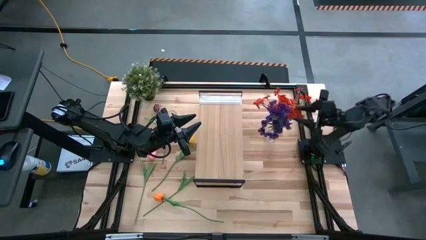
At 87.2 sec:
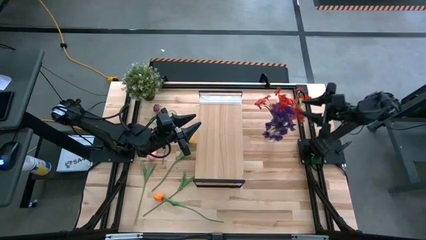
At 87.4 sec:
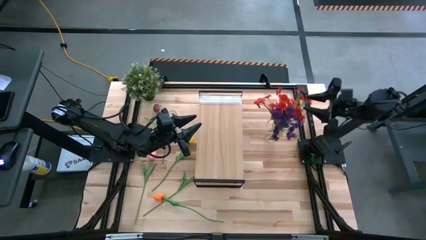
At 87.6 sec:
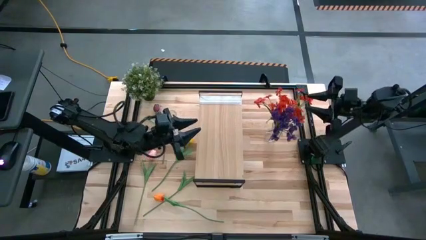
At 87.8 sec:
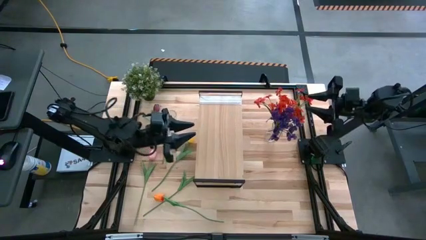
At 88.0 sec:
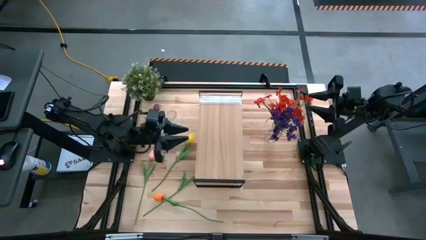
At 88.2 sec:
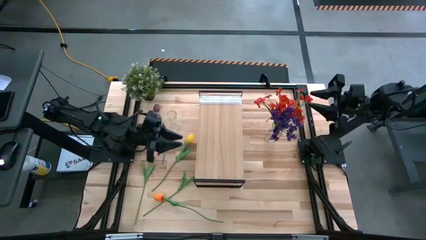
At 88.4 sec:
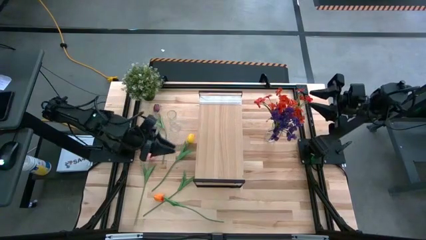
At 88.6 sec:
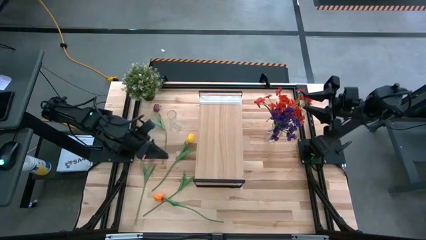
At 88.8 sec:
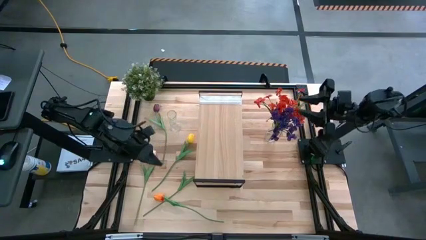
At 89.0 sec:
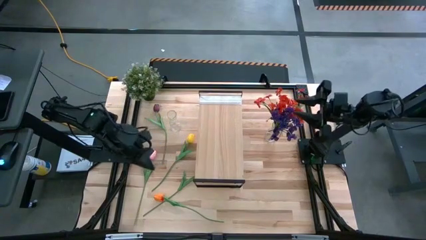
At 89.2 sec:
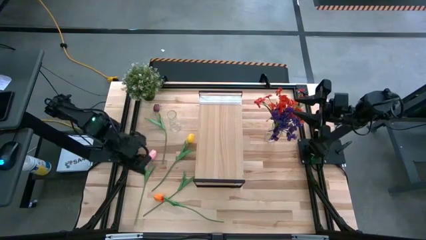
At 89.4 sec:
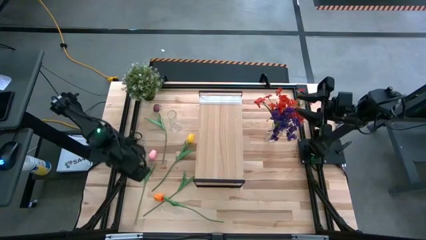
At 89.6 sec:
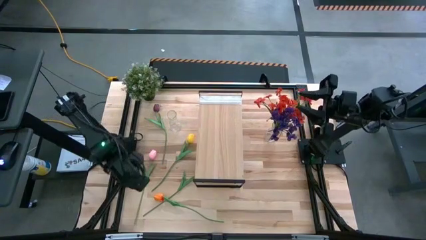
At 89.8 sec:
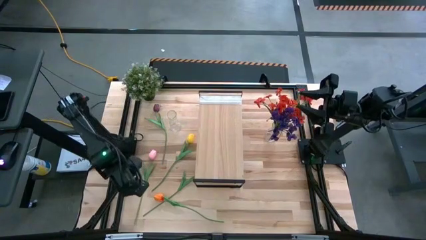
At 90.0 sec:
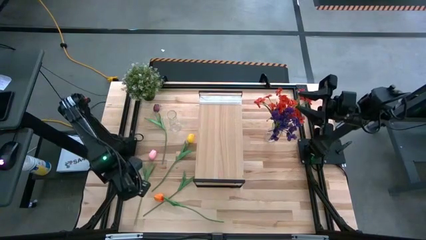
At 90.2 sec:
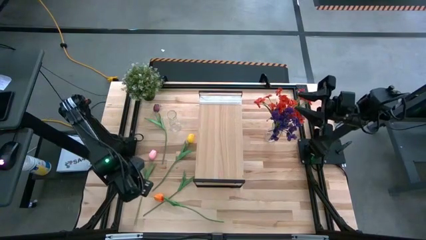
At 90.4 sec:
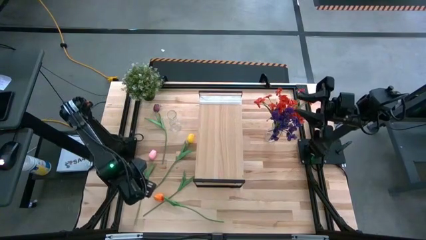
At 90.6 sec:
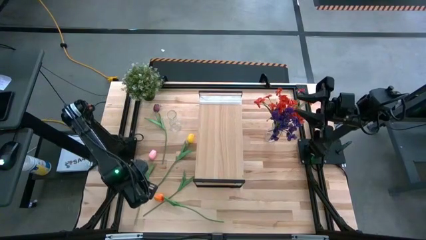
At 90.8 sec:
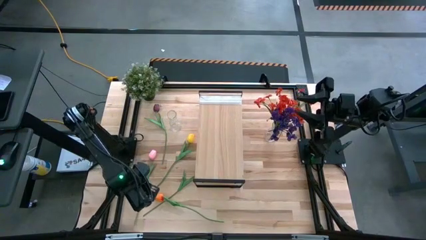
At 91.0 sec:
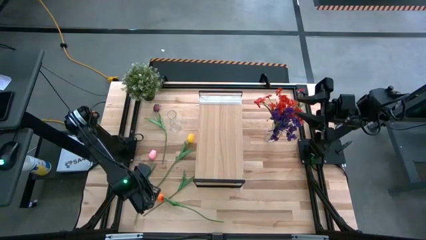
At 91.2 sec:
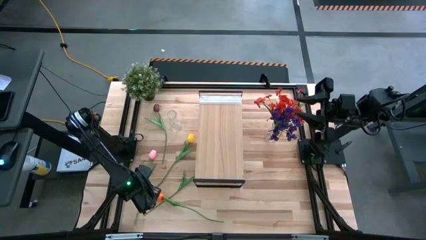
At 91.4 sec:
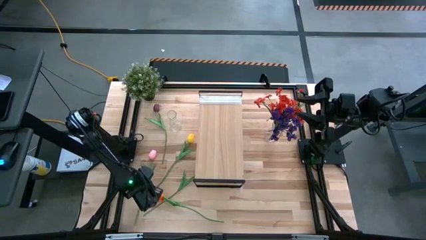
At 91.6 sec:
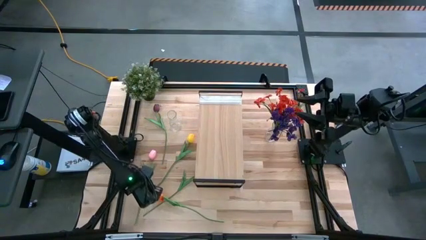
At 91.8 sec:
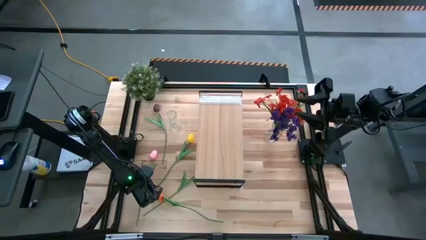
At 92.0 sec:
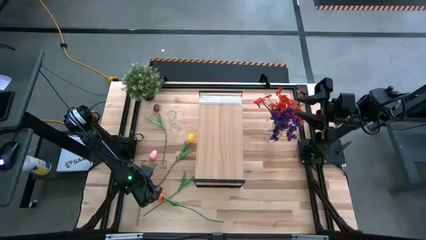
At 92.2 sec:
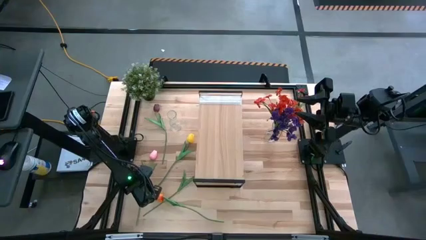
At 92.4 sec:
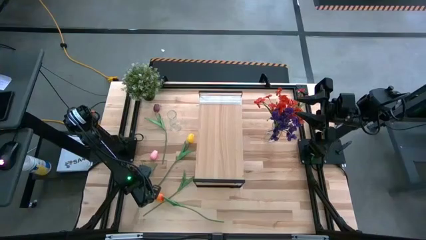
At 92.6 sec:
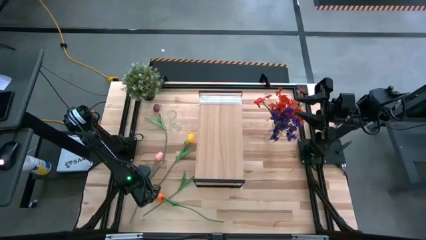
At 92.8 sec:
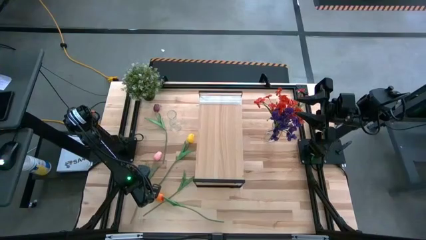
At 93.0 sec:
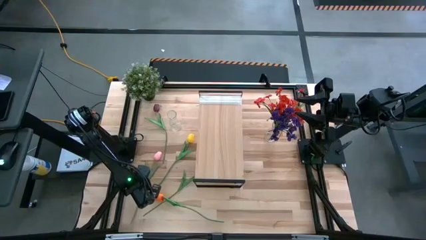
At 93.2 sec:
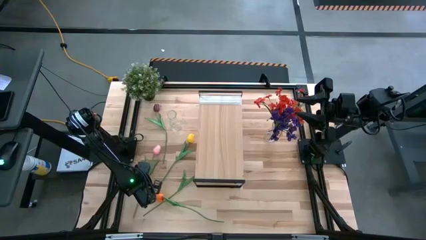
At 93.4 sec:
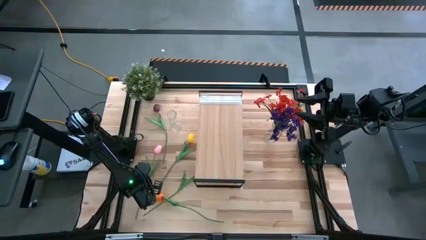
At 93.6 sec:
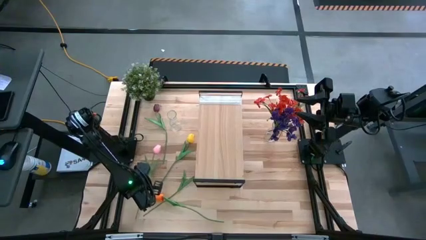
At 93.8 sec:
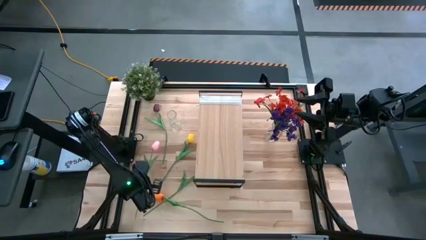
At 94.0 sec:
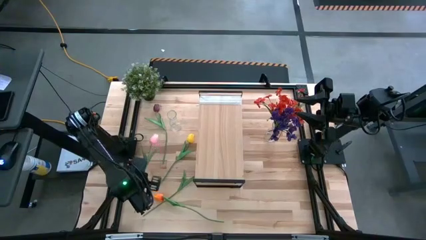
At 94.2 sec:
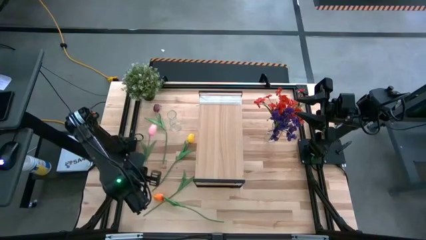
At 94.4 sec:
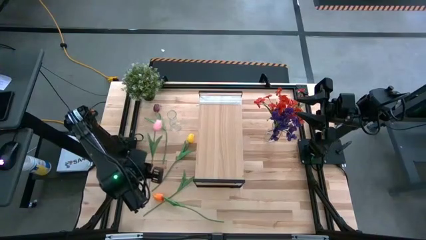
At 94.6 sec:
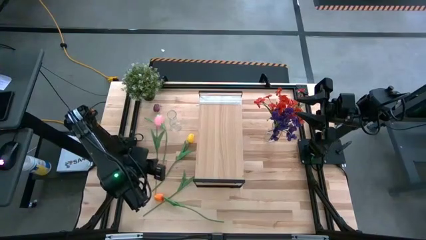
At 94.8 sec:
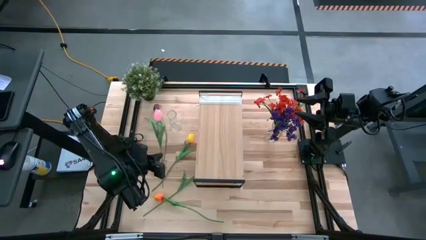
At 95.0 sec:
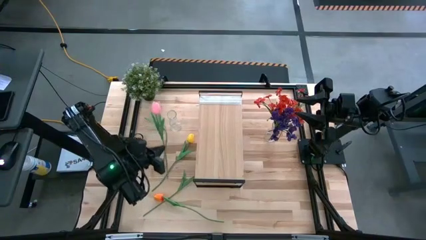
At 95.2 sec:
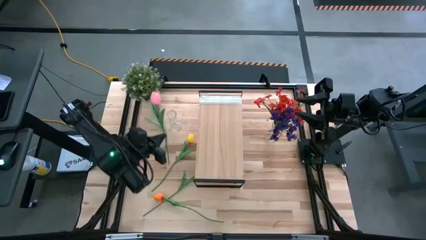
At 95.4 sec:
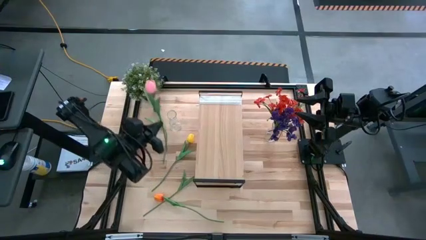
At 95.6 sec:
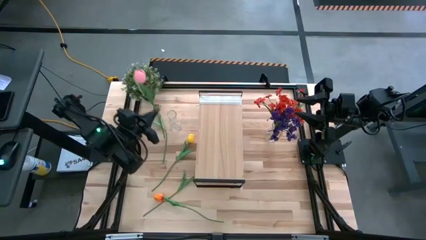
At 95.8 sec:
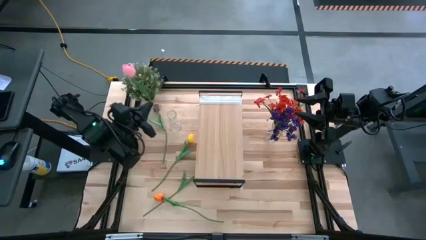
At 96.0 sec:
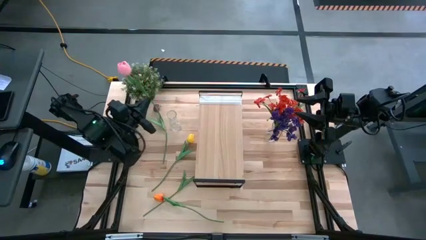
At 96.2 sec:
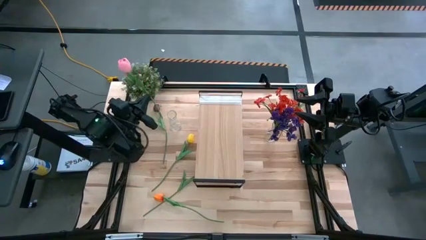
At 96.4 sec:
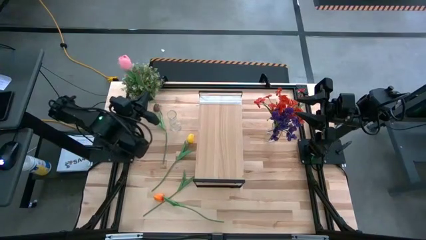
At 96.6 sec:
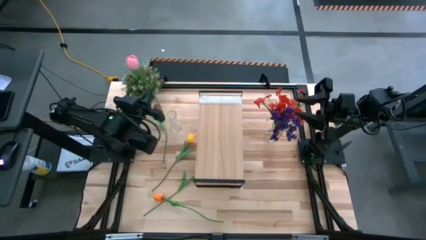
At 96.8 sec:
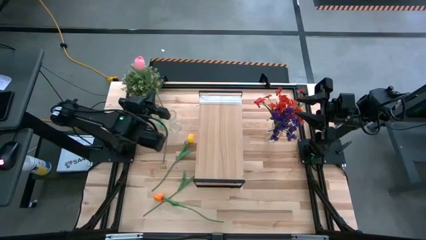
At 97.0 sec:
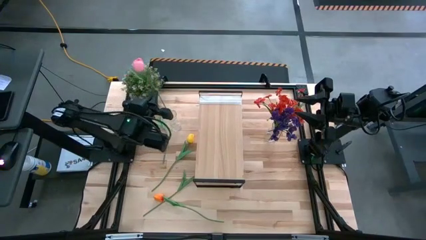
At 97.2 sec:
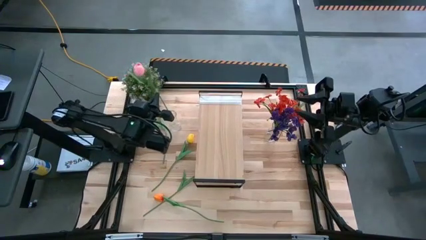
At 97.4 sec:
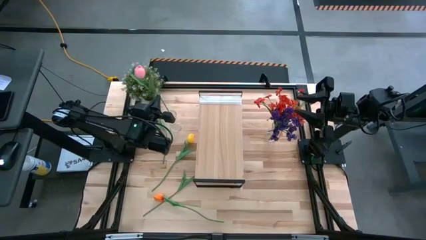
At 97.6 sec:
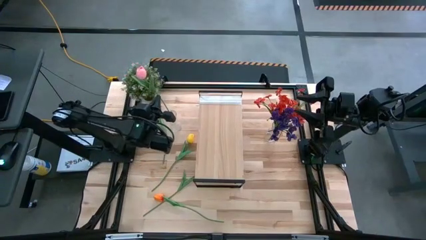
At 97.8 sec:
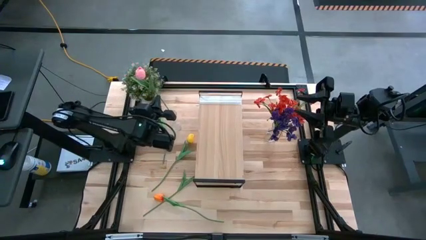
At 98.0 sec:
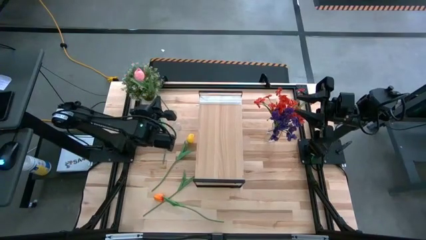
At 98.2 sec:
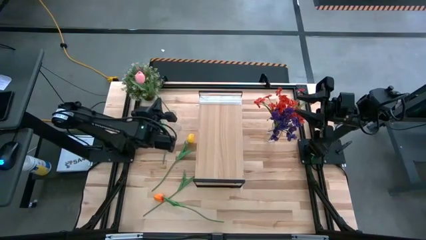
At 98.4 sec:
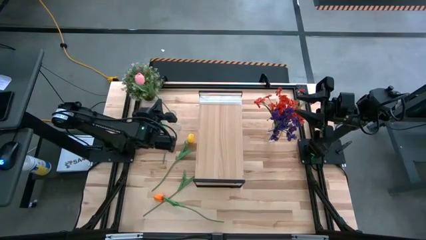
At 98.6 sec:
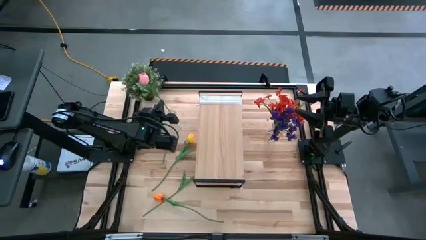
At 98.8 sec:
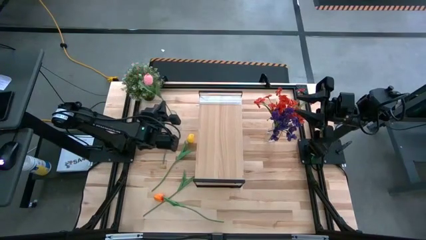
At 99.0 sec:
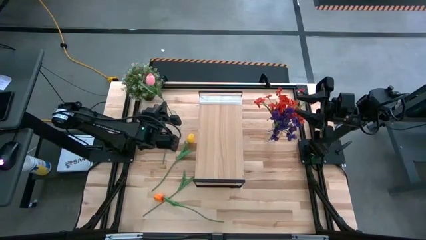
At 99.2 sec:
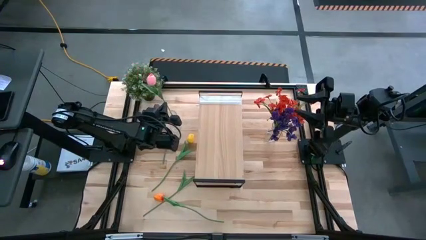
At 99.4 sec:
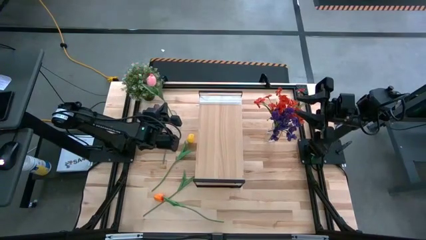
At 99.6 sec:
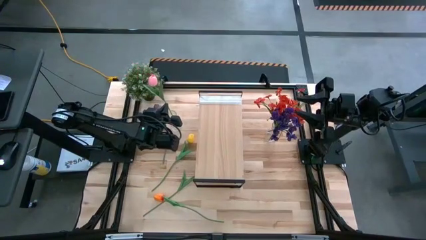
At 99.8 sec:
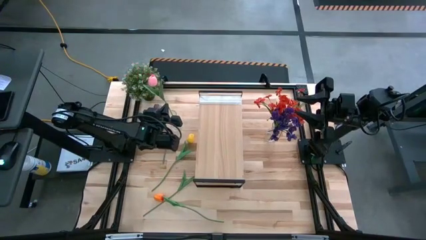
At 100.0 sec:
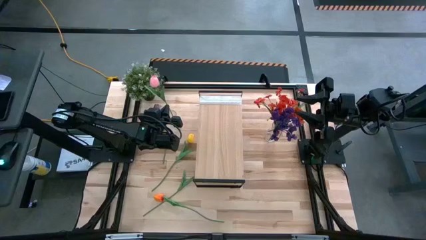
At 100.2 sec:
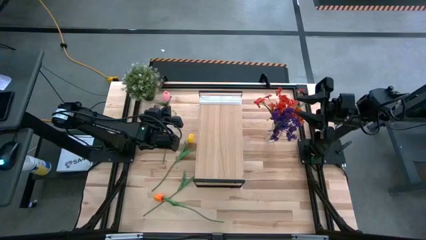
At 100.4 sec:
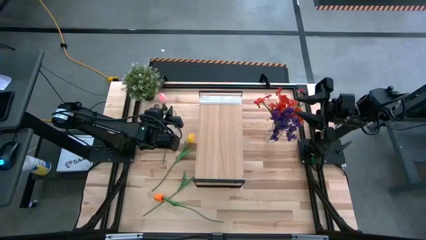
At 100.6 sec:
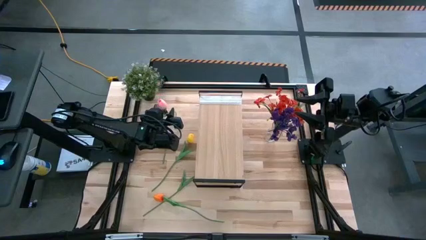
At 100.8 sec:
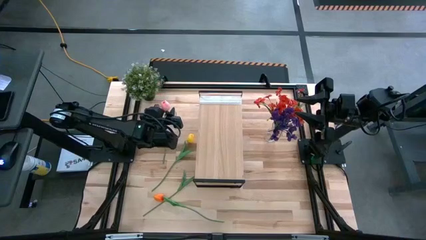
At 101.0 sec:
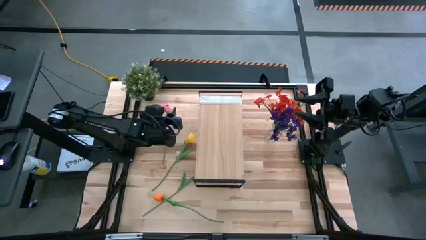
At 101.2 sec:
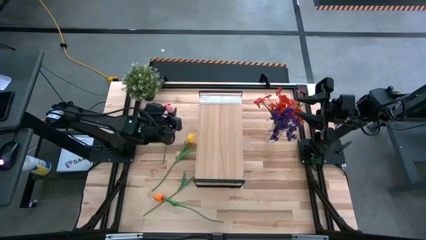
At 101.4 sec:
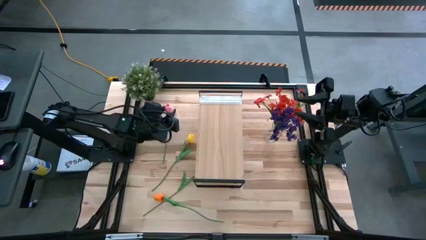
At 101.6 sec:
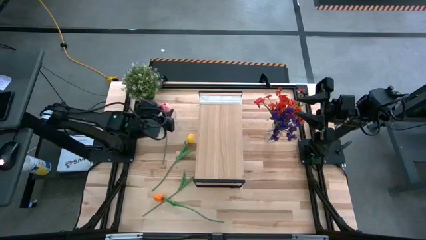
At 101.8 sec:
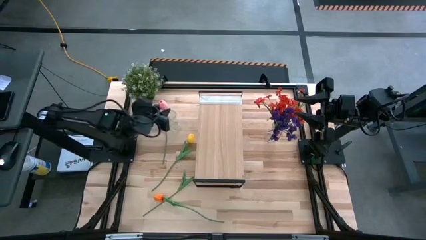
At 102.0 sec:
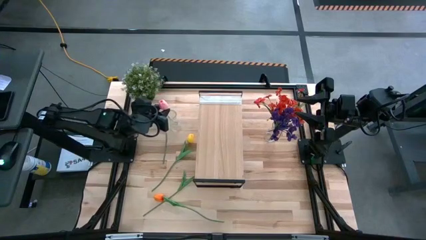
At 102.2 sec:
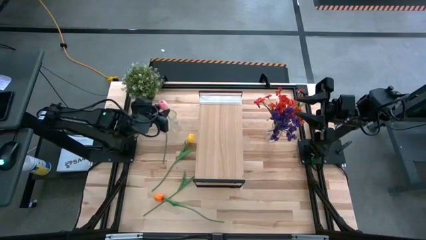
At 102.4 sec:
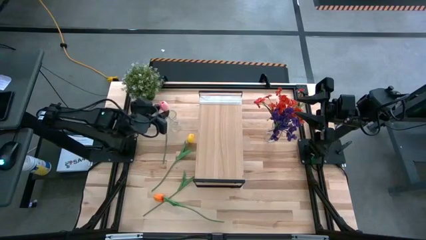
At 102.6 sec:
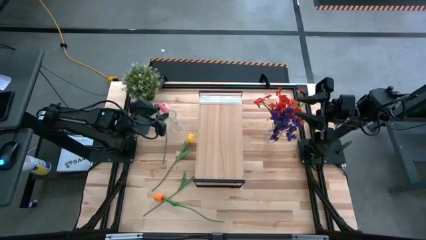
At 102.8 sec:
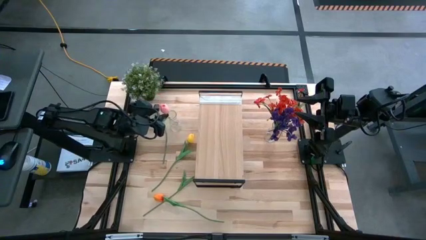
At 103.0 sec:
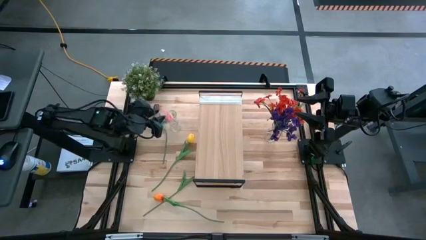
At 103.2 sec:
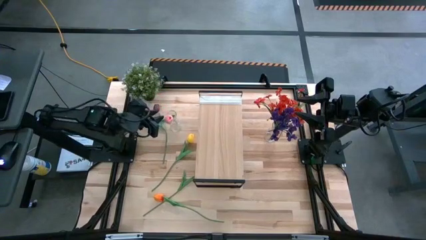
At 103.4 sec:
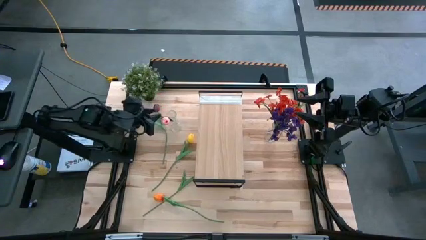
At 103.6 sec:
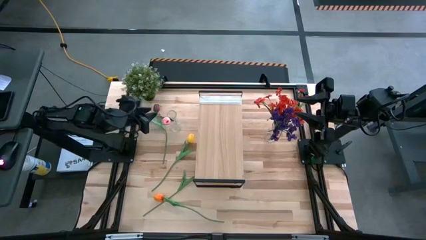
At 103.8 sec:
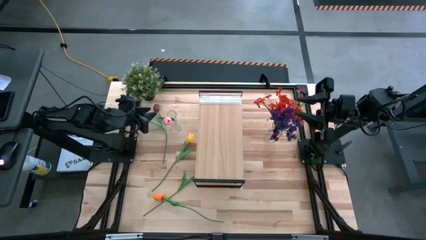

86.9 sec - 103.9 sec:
Task: Pick and place flowers into a vace then onto a shelf
Put the pink tulip into the left transparent vase
